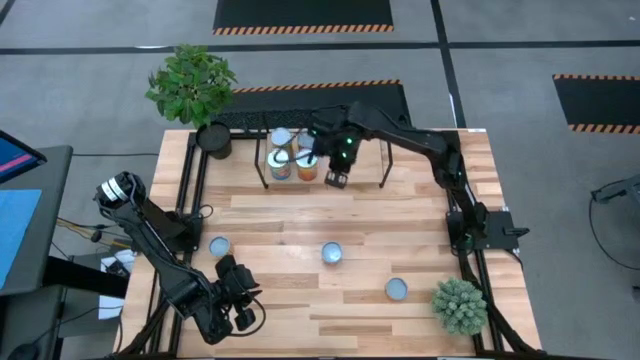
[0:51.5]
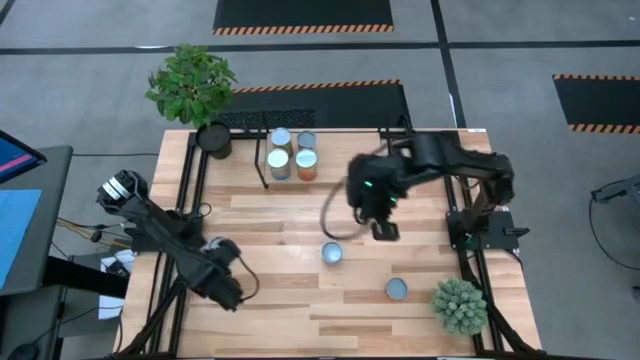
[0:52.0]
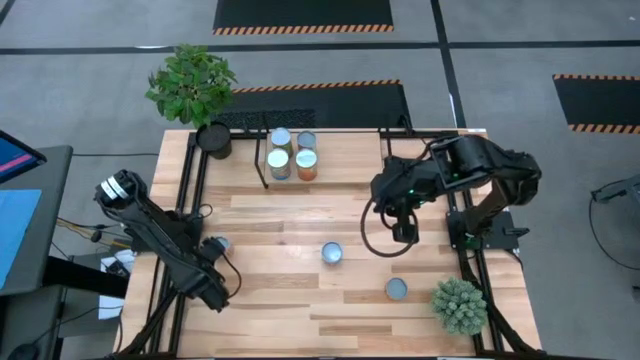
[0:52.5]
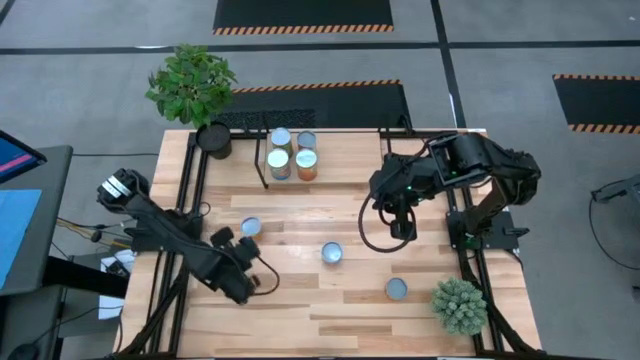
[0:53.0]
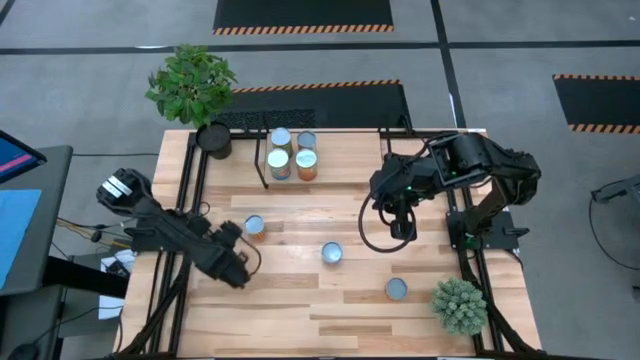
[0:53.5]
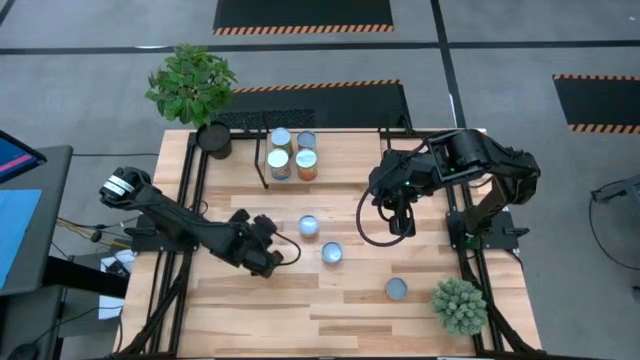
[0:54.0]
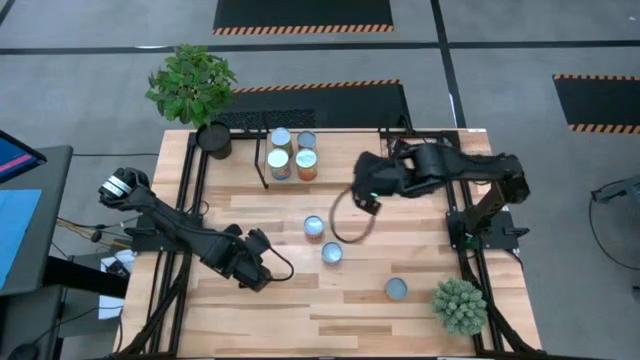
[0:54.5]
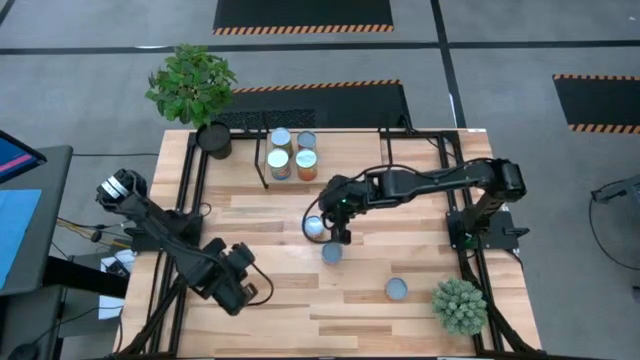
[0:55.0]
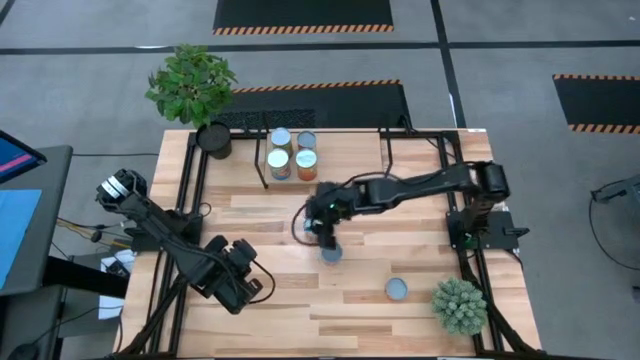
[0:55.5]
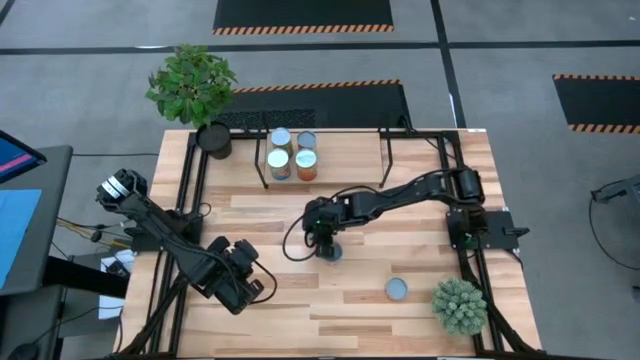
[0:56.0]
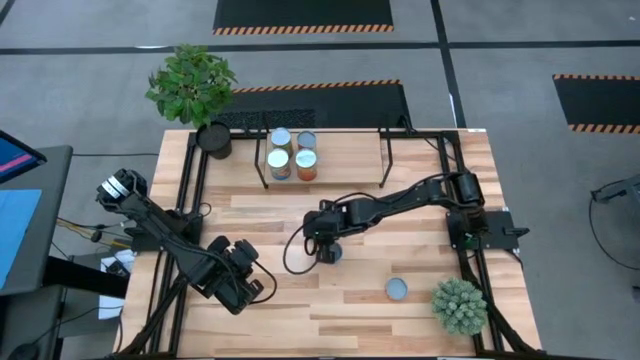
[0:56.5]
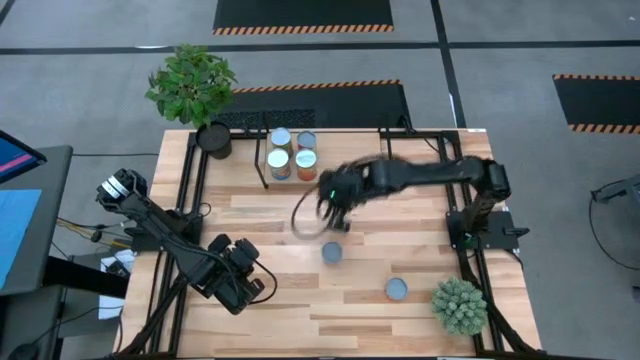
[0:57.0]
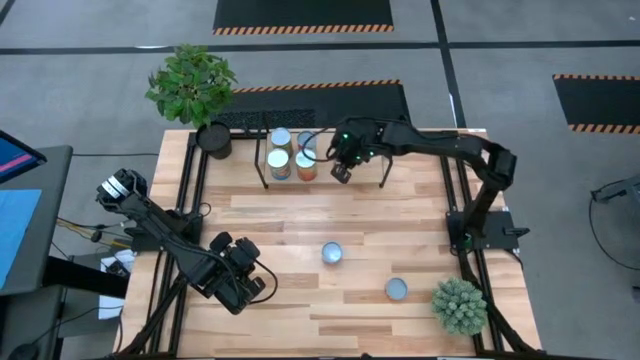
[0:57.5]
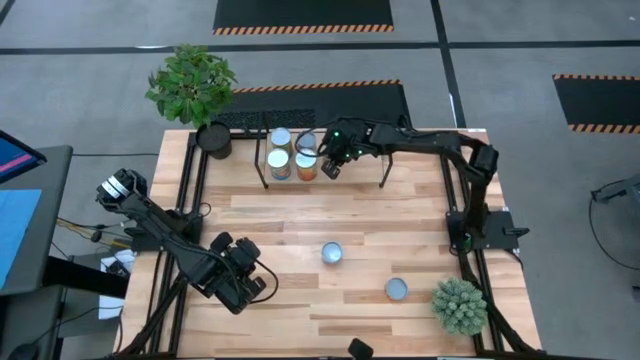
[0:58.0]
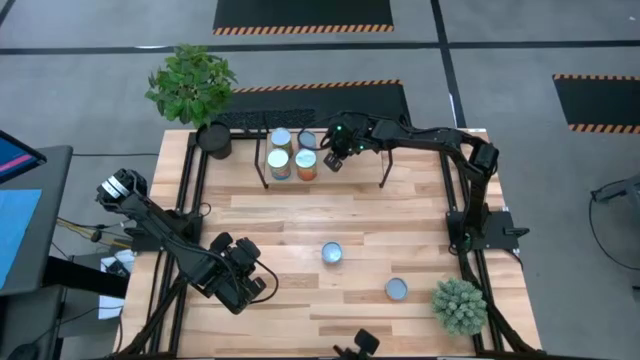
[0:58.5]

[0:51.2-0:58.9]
Task: Pick and place cans onto a shelf
Put the canned black beans on the shelf

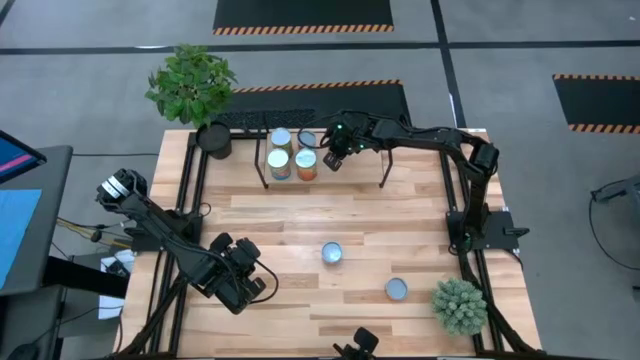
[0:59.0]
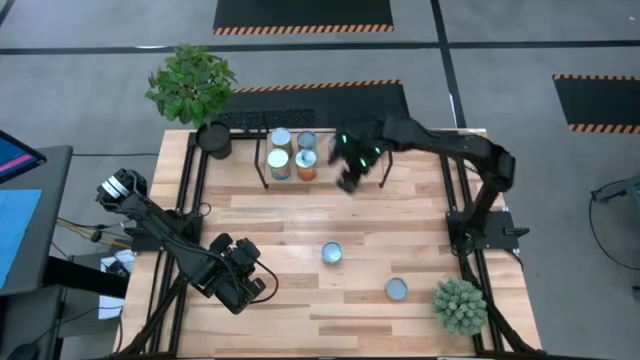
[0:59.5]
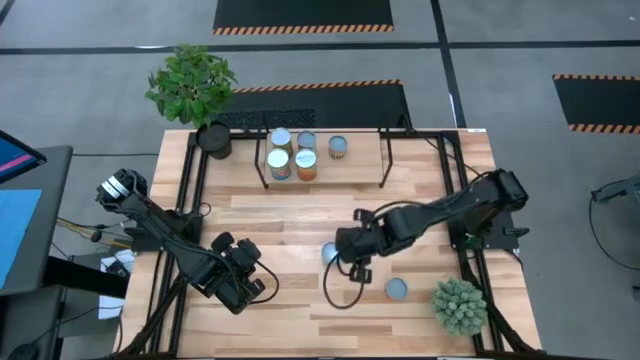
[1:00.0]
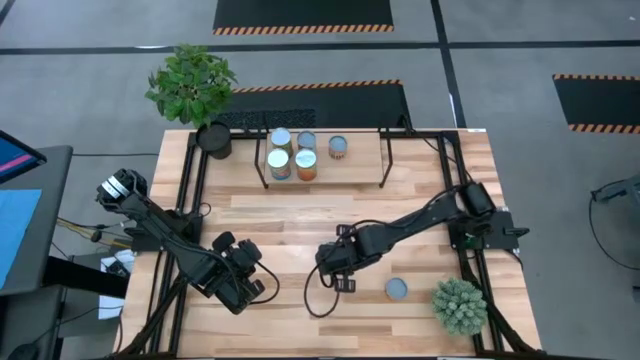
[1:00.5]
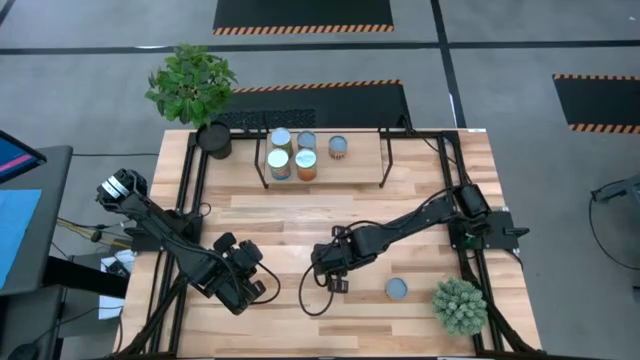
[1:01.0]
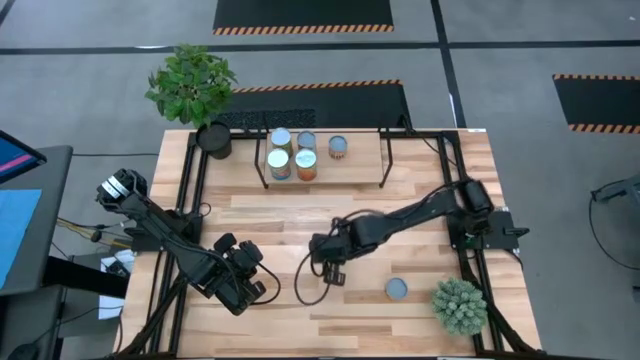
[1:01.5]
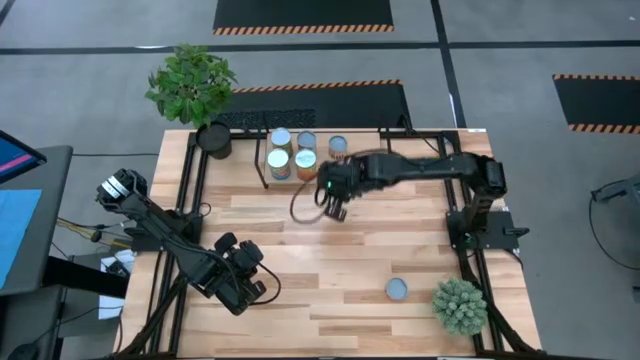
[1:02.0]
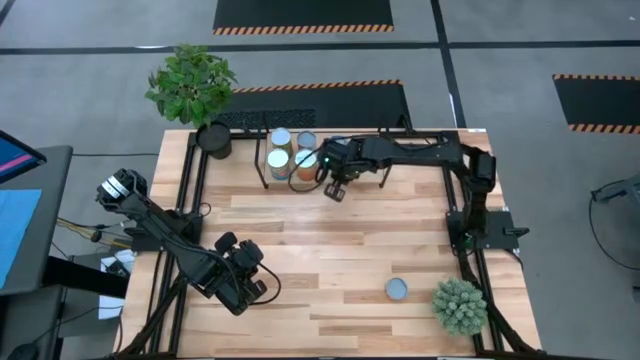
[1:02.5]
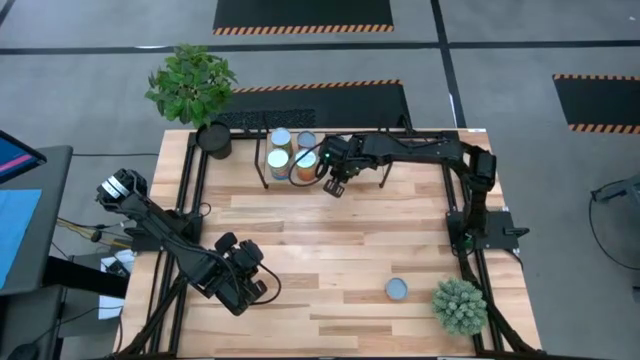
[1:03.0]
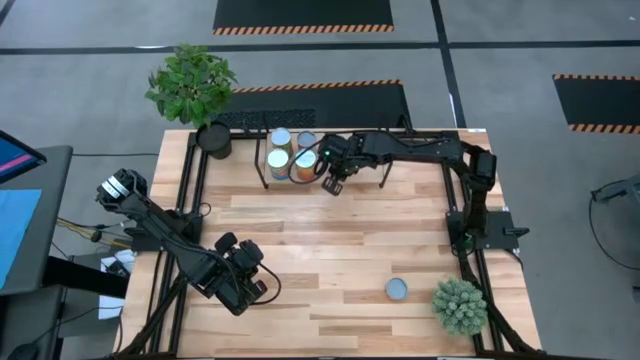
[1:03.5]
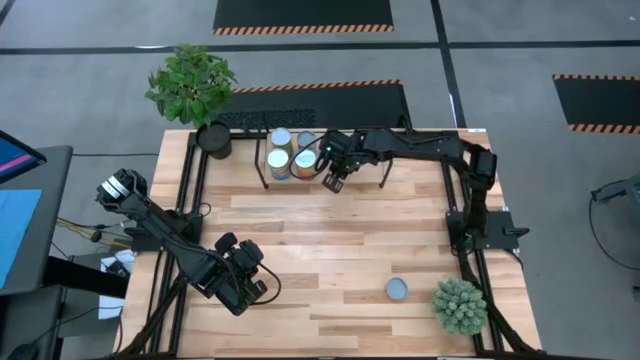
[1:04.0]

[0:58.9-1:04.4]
Put the canned corn on the shelf

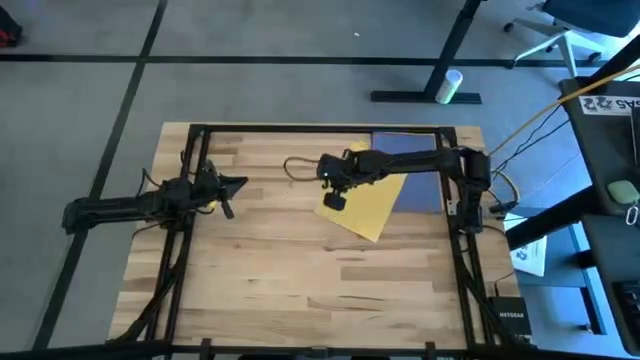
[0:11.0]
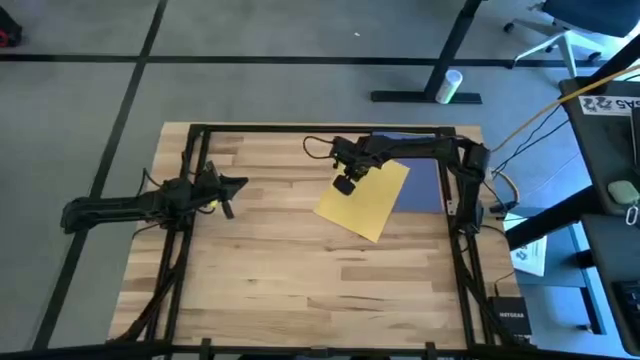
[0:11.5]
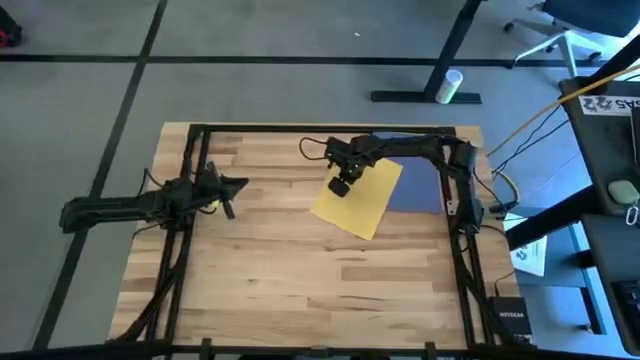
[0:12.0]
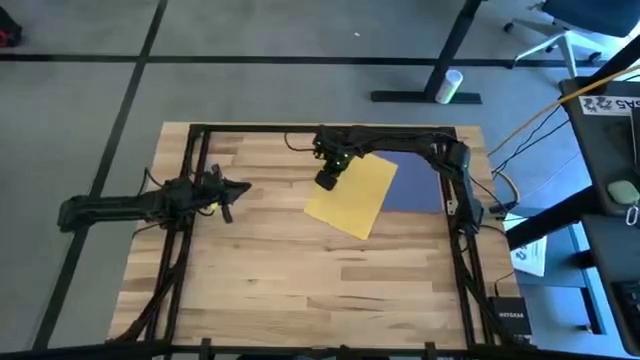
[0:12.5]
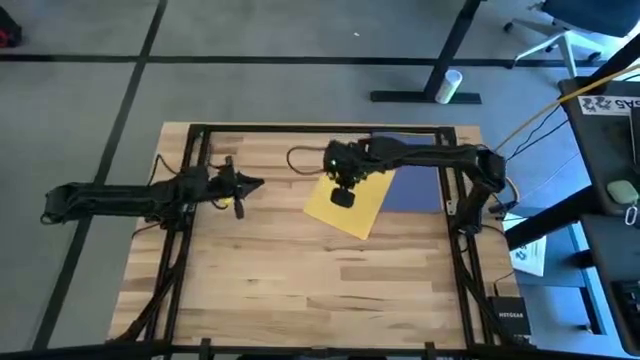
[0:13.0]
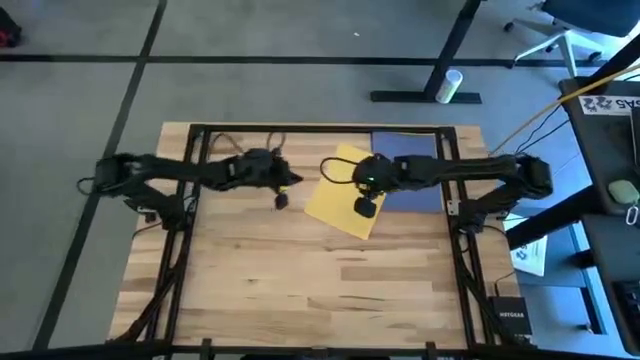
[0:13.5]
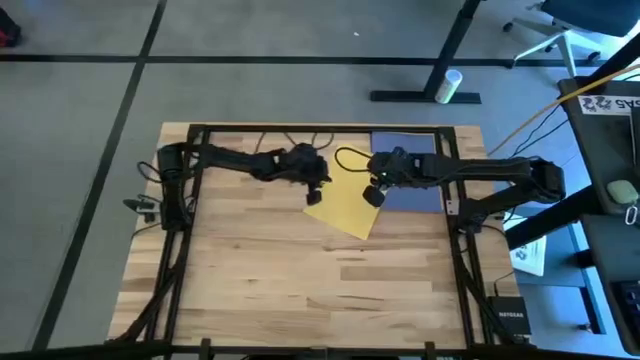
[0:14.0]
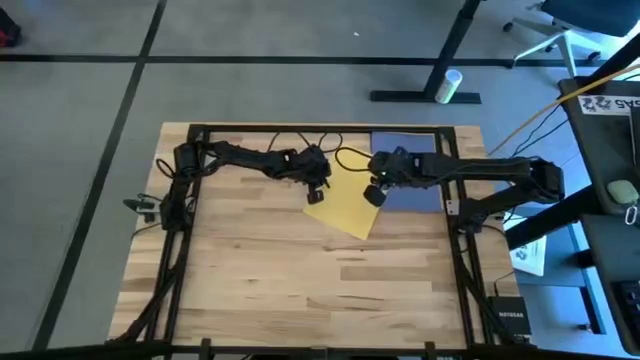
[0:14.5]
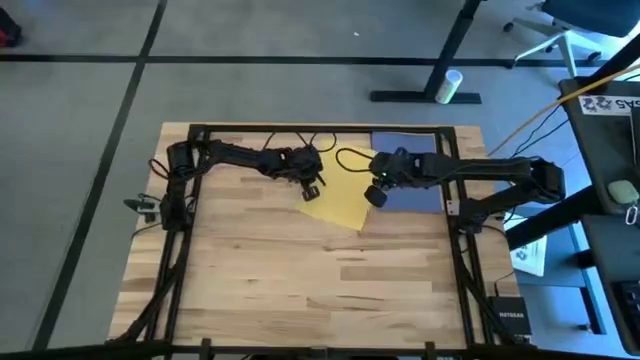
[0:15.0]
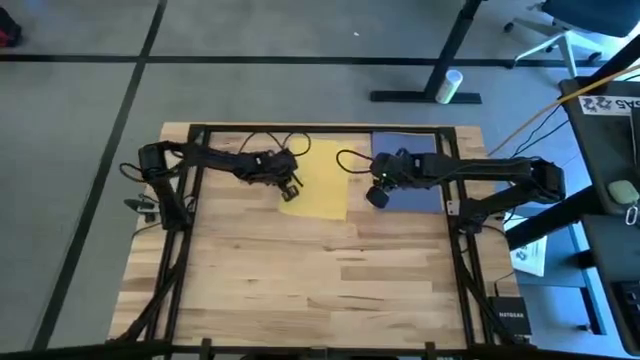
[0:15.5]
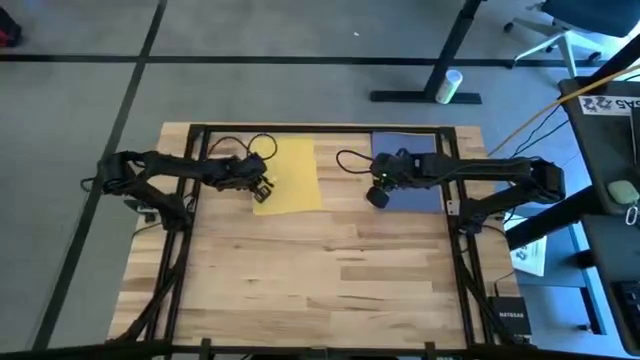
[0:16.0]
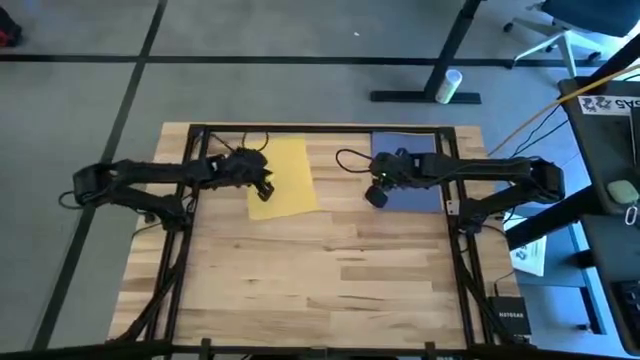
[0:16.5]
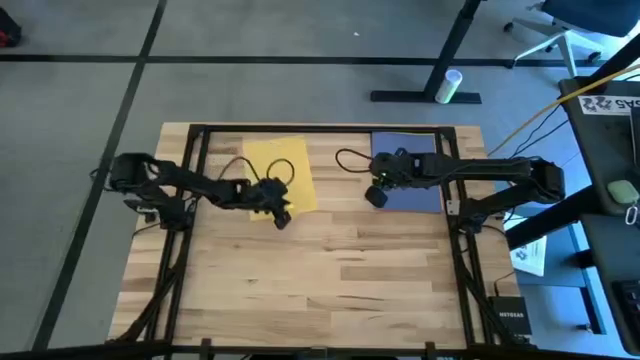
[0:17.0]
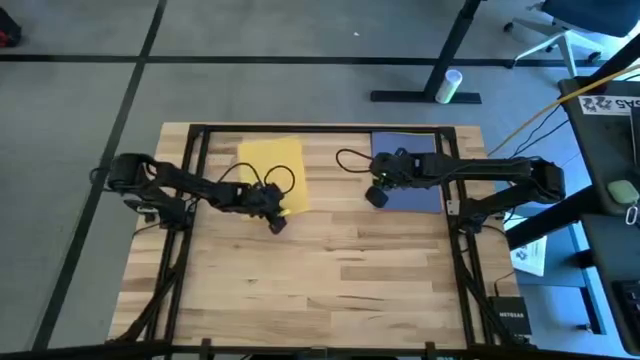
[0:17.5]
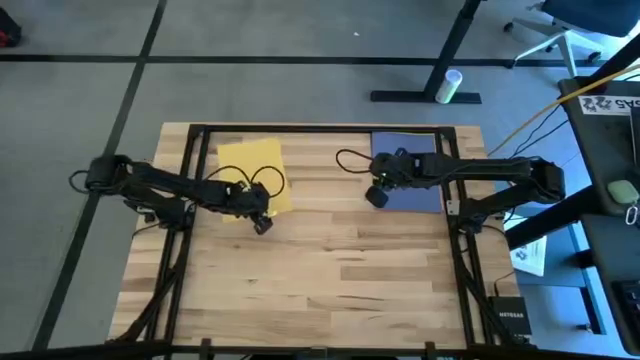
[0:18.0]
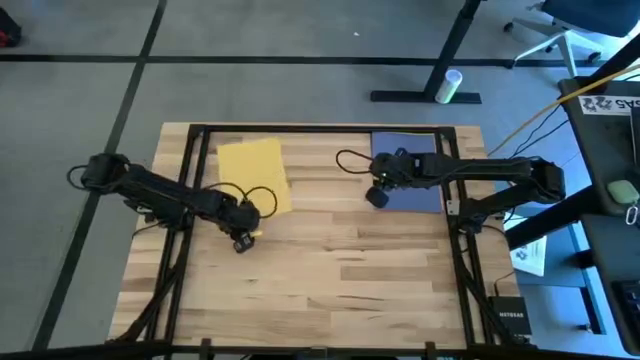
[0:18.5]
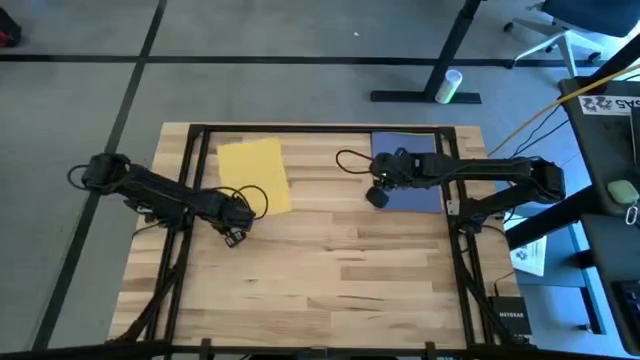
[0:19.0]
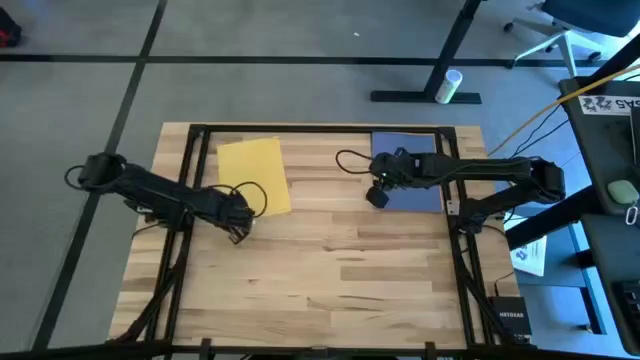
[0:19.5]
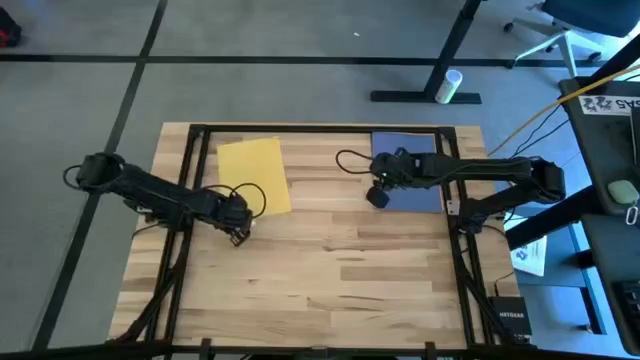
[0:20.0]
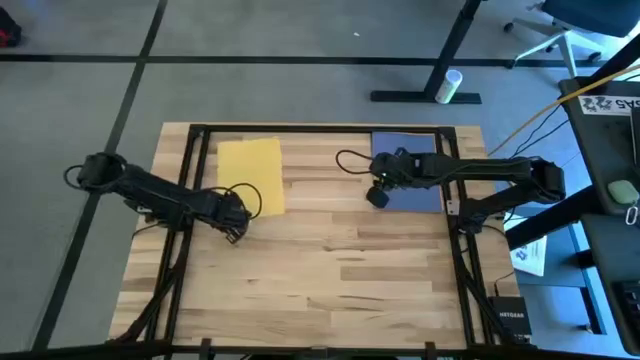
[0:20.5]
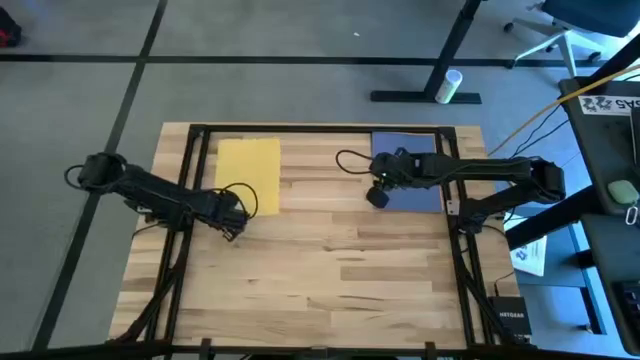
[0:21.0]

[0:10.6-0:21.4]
Task: Organize paper
Move the yellow paper to the top left of the table
